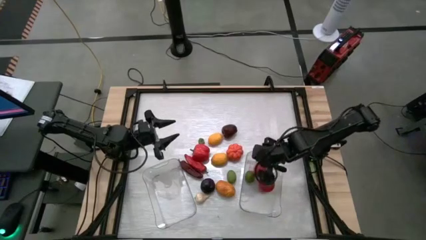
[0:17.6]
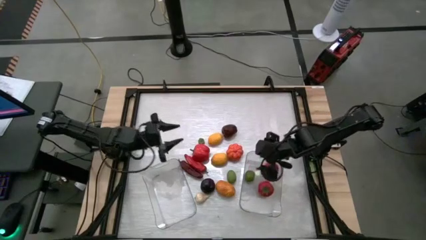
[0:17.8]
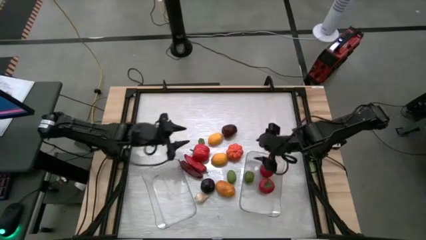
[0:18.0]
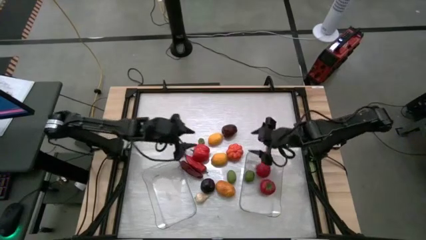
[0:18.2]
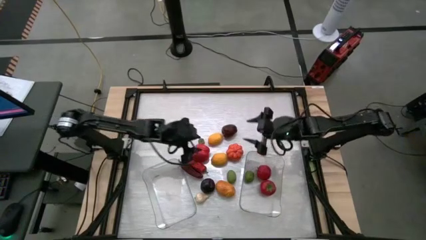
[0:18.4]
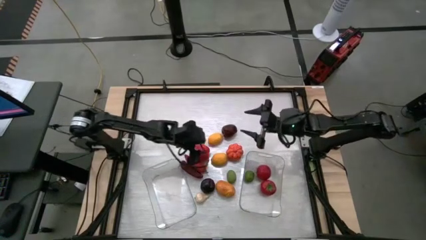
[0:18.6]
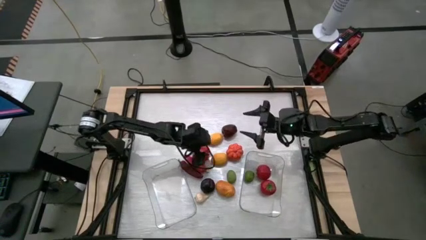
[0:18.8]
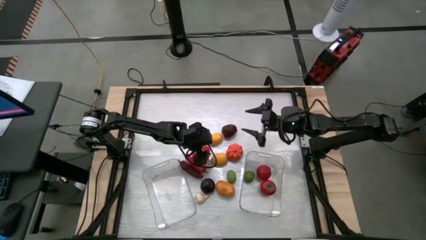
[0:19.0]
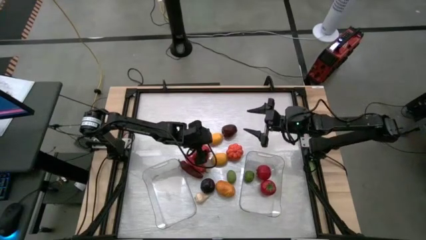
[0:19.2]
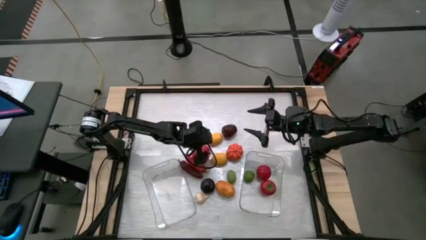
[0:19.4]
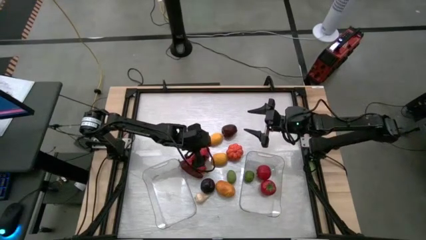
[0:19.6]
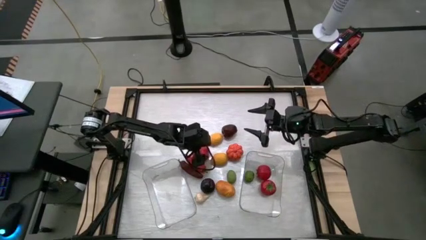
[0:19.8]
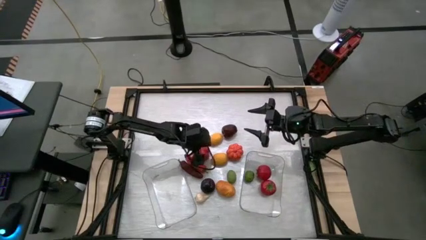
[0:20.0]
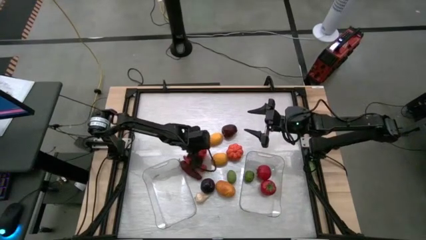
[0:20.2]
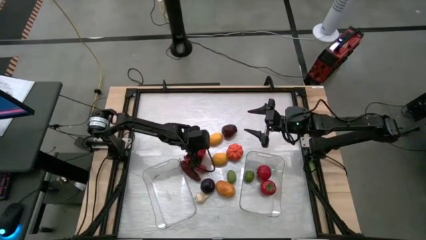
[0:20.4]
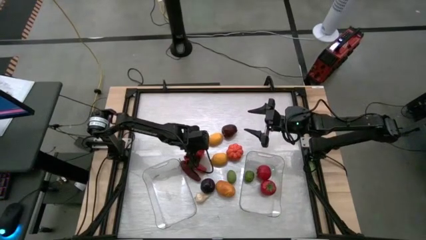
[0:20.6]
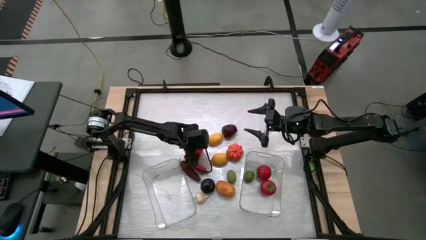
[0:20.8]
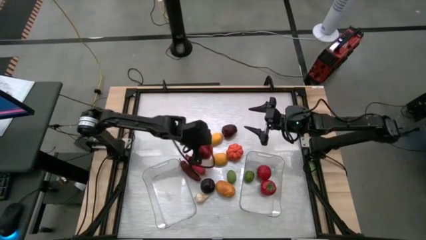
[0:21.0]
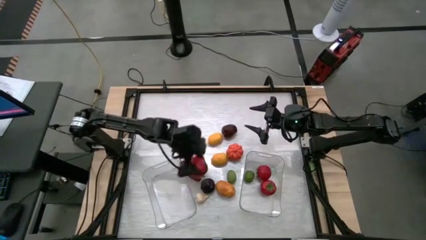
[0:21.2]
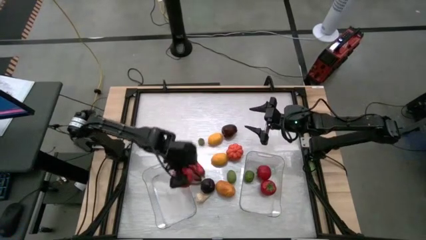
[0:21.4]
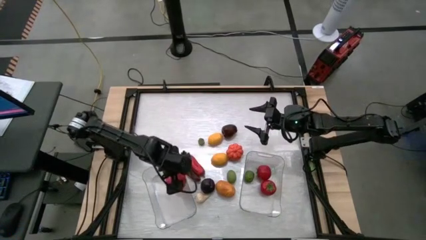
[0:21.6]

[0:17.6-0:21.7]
Task: Sort produce into baskets
Put the bell pepper into the left transparent bin

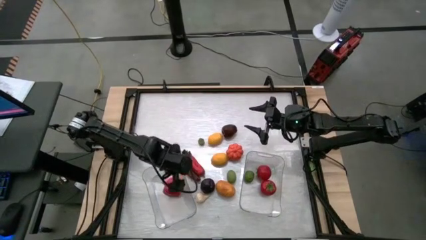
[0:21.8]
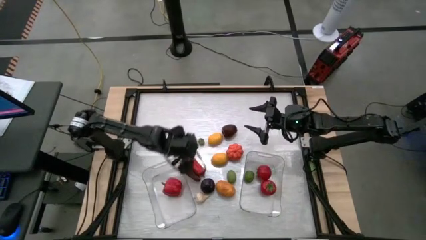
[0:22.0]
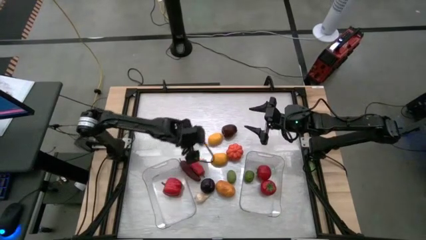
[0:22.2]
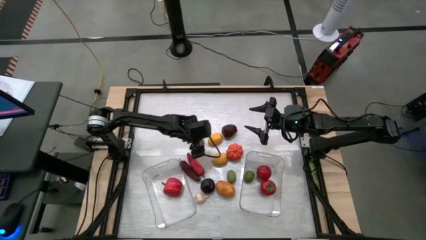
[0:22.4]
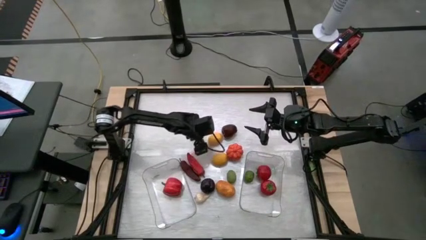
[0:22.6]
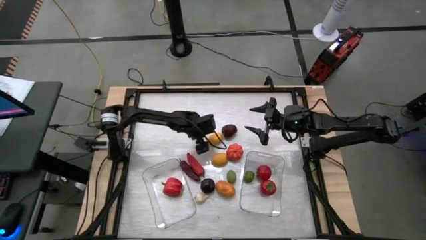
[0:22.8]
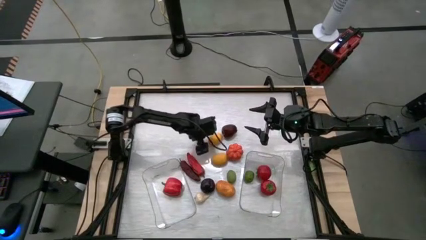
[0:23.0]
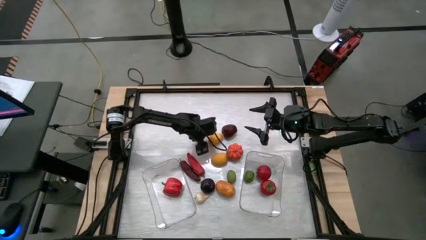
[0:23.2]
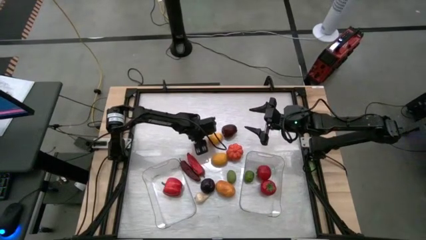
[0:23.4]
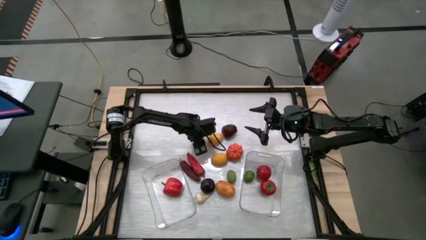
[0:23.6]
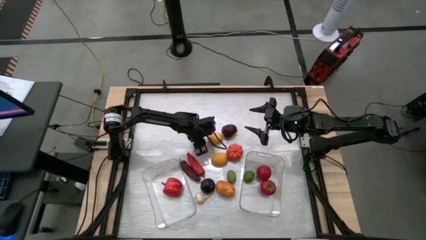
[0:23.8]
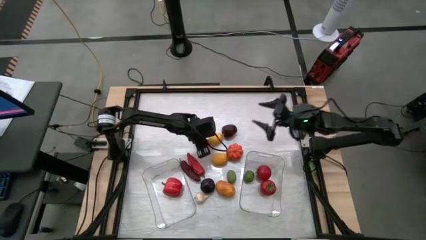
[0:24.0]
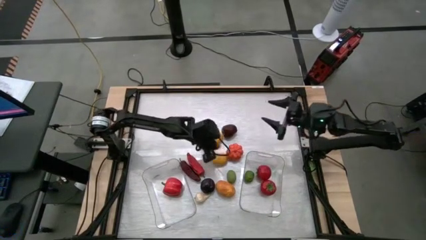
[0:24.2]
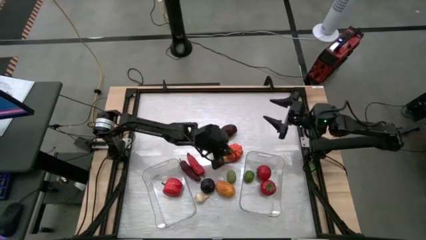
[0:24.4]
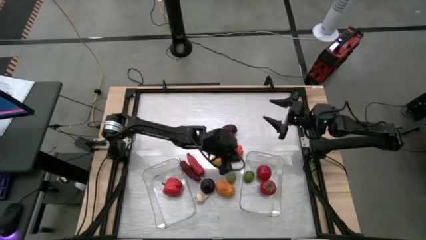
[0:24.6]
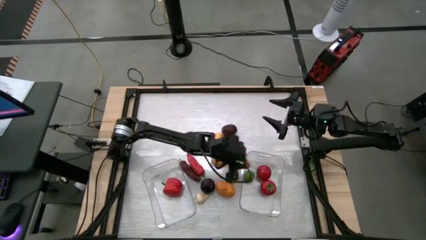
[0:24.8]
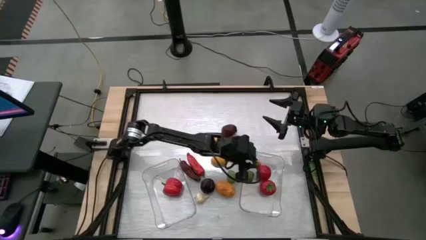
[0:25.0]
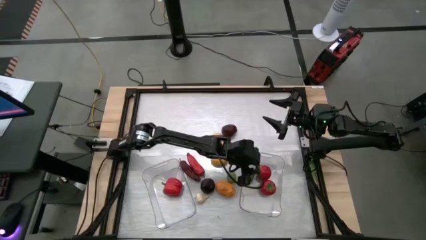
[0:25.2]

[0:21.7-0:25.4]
Put the peach into the right transparent bin

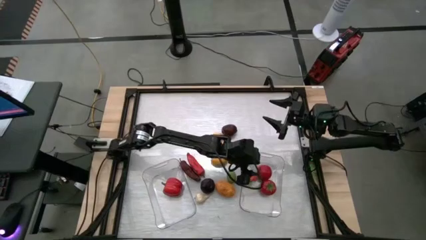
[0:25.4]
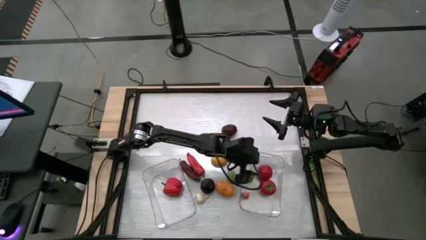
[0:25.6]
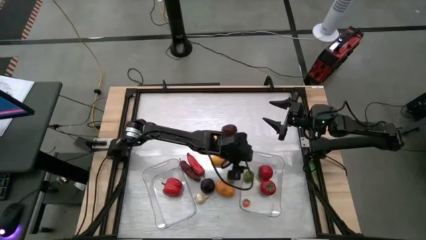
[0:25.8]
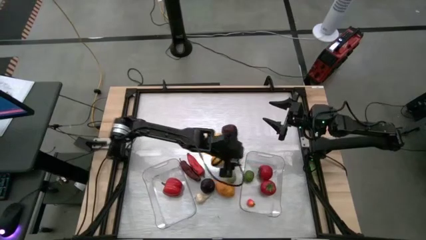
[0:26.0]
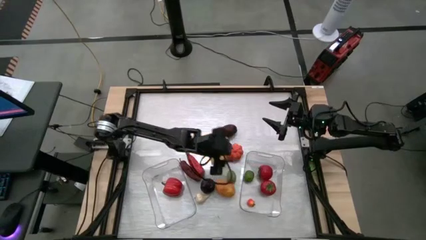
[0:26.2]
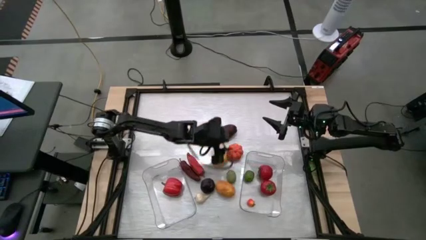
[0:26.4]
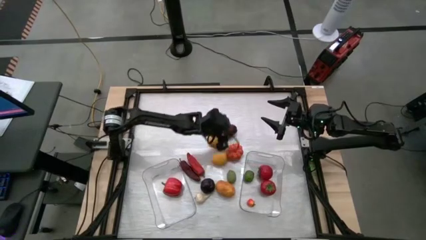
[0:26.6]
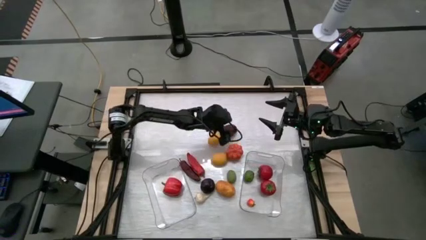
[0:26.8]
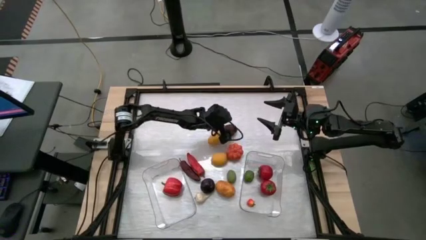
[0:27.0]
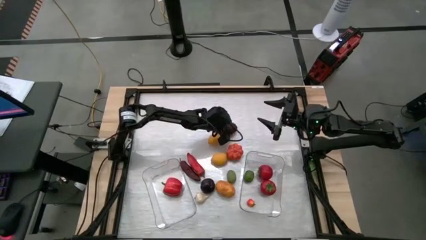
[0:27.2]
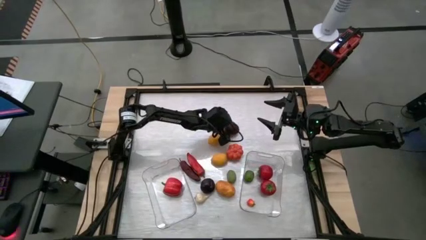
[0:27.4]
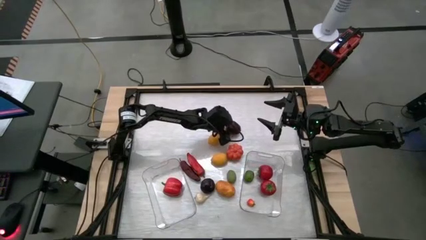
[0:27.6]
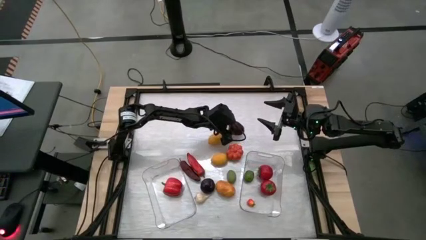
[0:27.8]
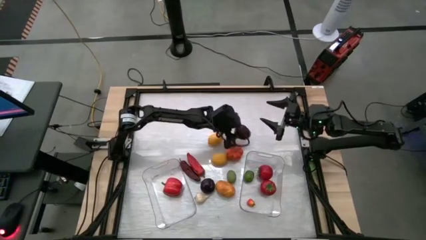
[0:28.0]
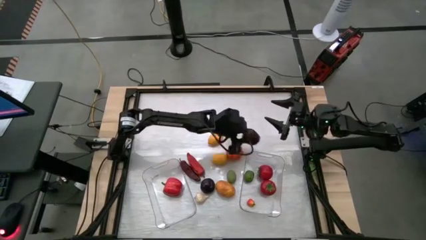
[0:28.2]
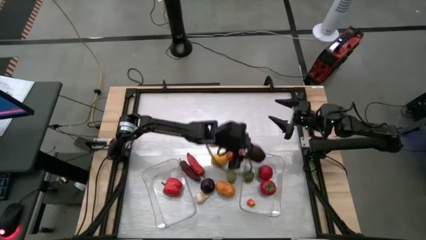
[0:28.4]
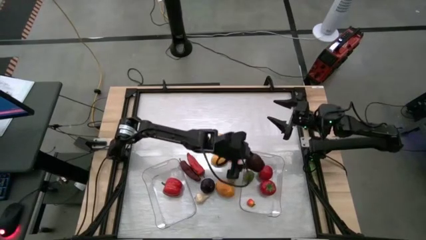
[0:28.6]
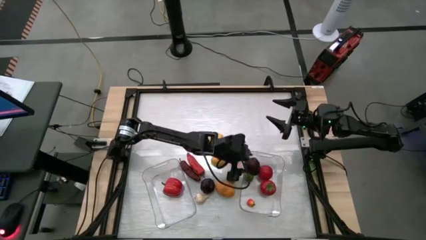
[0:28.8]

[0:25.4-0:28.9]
Put the apple into the right transparent bin

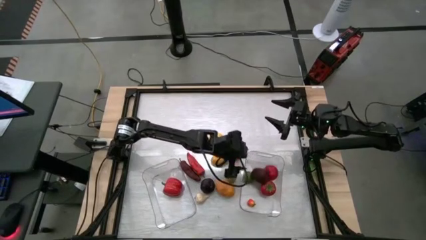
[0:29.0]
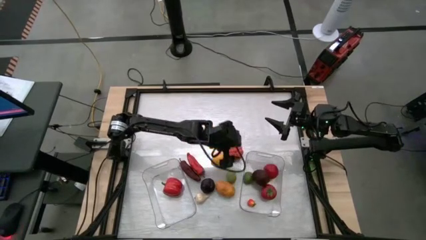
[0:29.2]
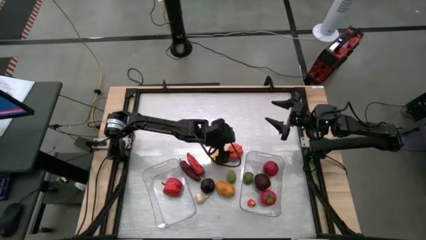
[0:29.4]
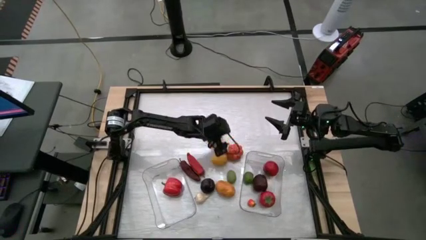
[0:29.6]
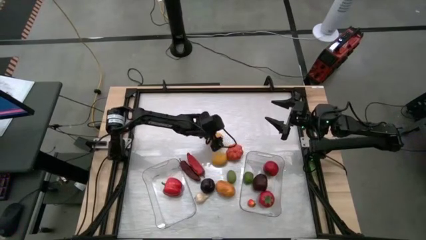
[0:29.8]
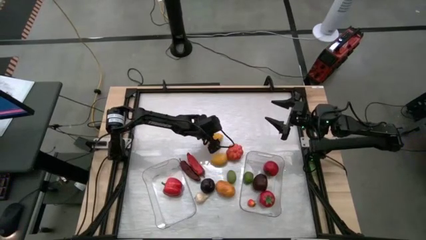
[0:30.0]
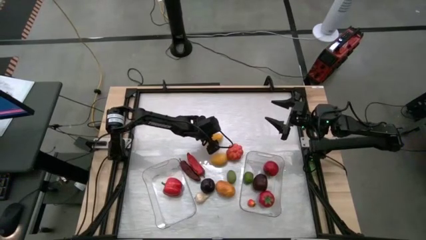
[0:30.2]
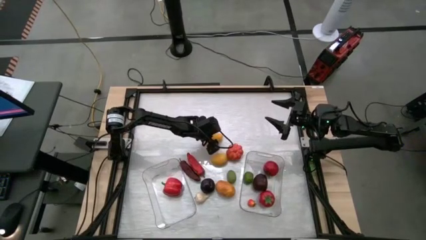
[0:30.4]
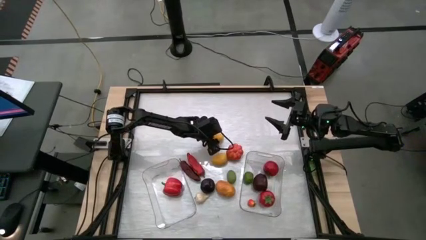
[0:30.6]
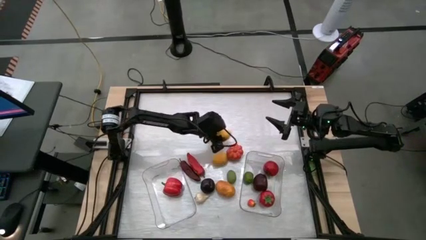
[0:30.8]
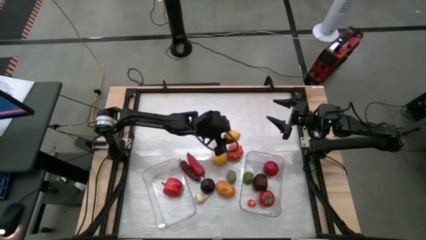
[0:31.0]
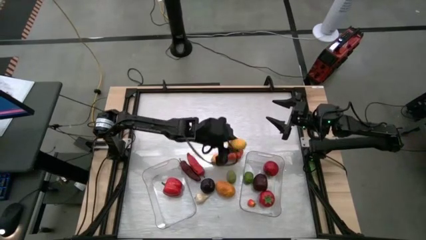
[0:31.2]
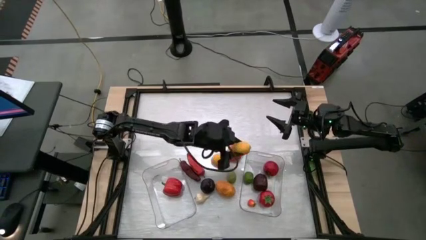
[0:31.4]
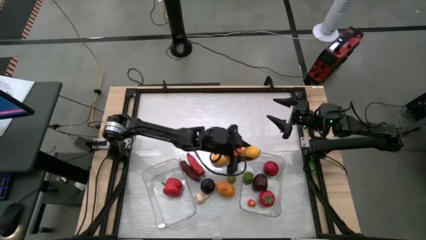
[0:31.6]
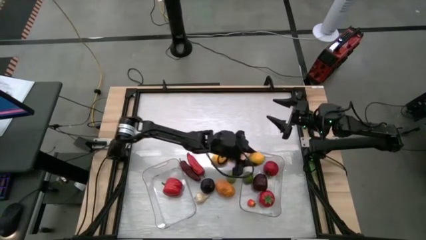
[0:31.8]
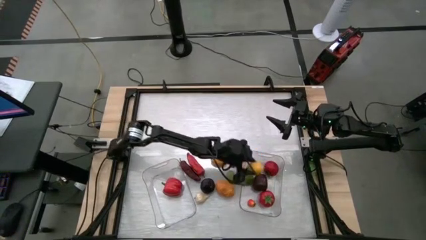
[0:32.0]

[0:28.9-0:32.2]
Put the top lemon into the right transparent bin

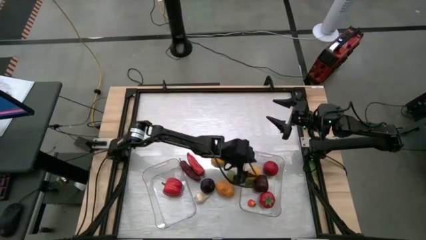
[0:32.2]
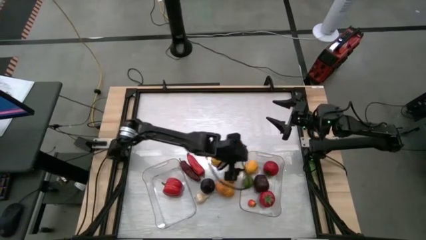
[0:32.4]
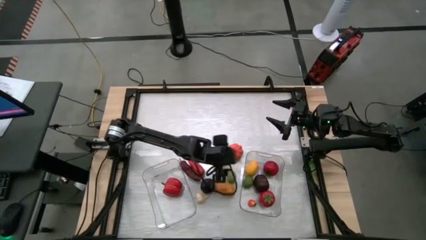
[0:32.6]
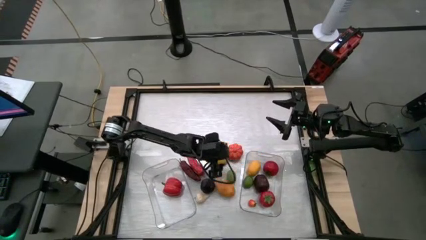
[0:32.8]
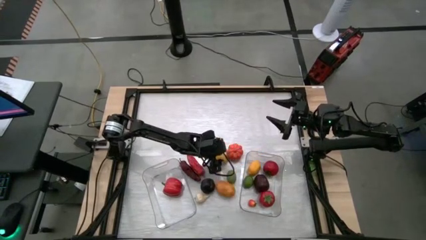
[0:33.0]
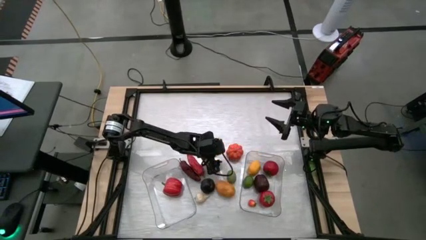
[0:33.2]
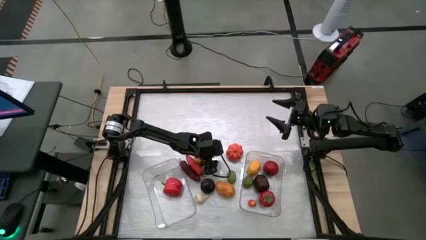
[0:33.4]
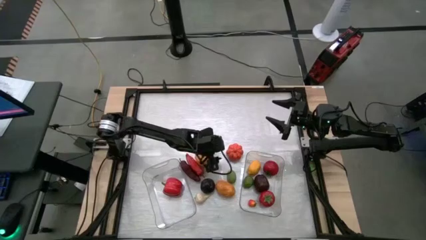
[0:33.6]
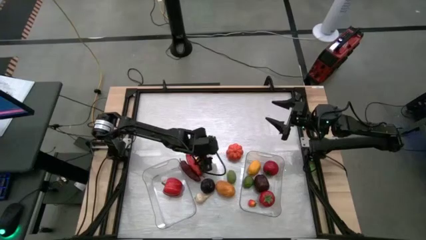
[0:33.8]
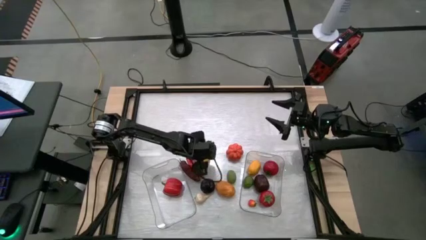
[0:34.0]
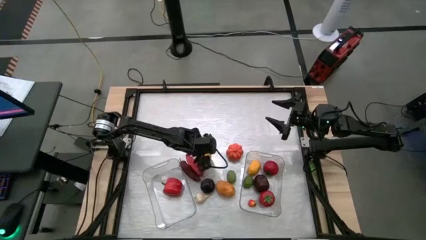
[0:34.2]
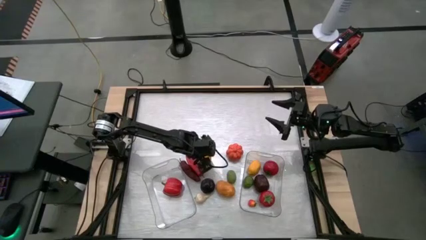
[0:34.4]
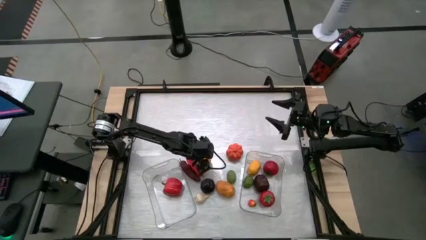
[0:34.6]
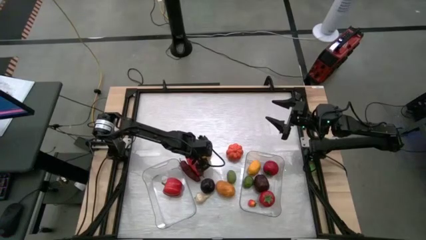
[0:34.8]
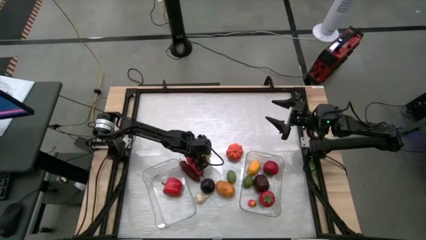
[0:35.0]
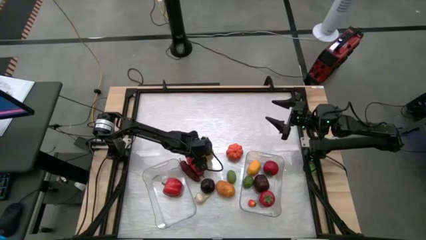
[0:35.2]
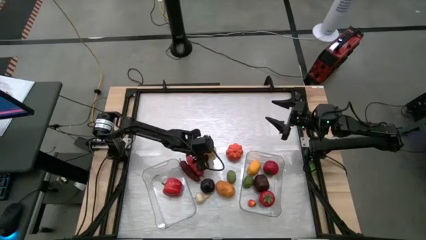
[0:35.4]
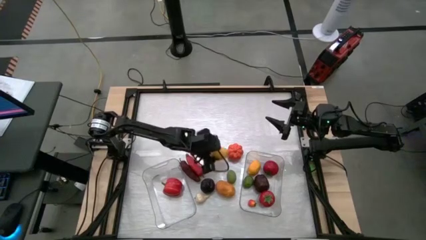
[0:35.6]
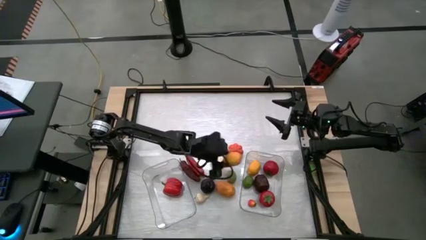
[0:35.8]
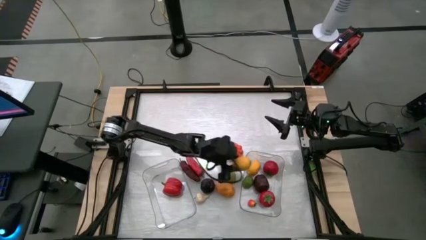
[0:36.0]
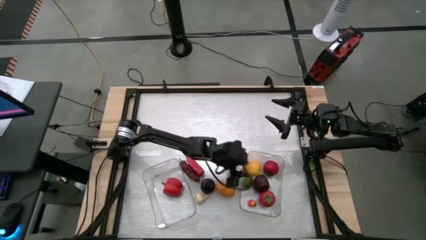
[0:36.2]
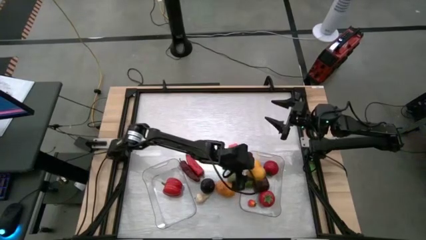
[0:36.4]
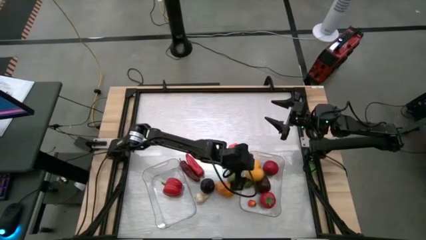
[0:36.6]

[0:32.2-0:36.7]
Put the lemon into the right transparent bin
